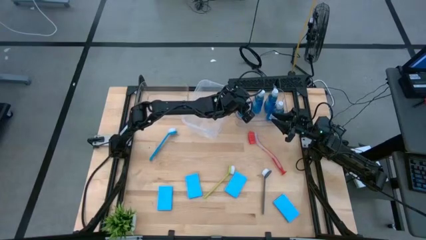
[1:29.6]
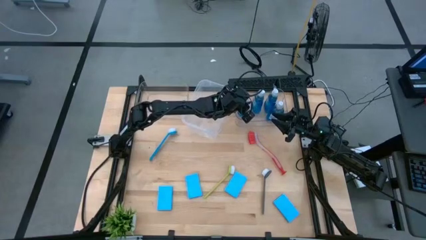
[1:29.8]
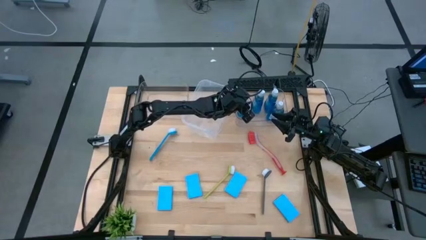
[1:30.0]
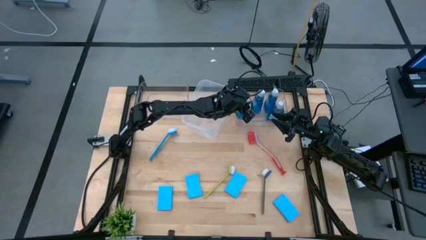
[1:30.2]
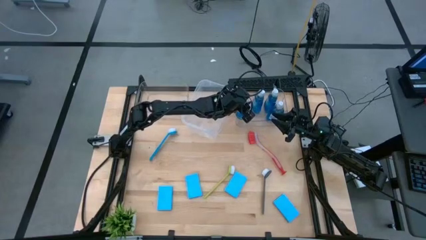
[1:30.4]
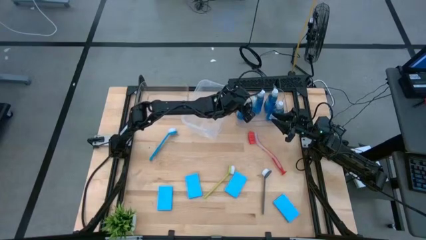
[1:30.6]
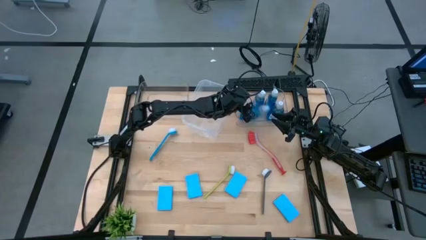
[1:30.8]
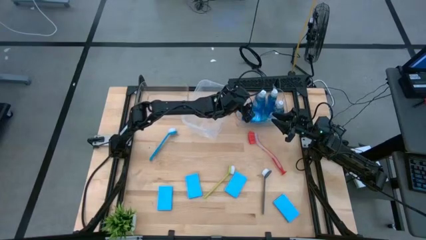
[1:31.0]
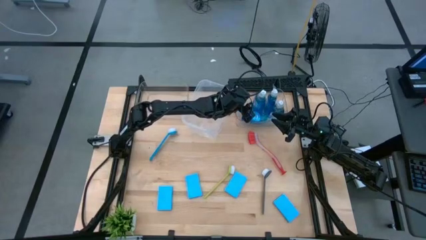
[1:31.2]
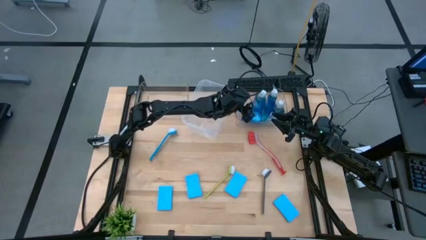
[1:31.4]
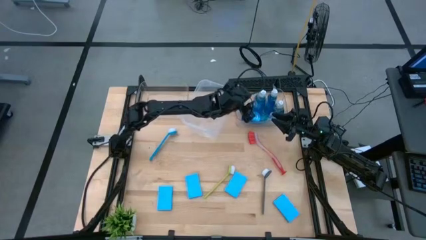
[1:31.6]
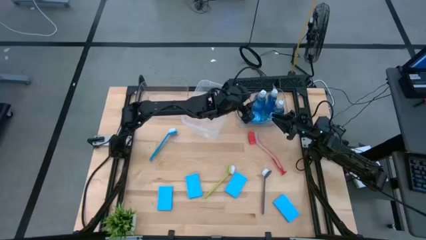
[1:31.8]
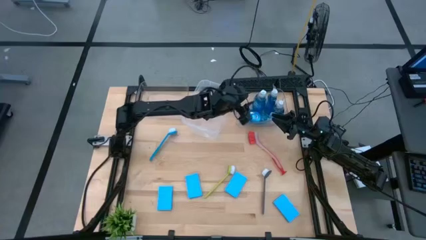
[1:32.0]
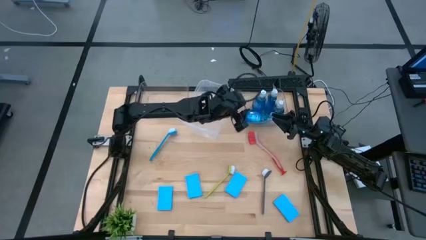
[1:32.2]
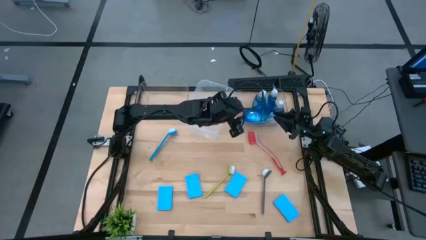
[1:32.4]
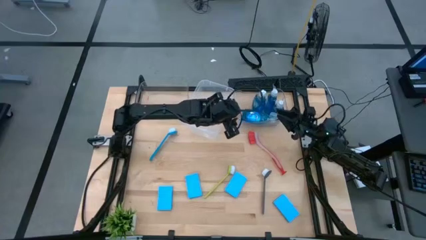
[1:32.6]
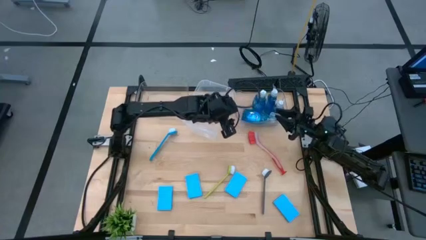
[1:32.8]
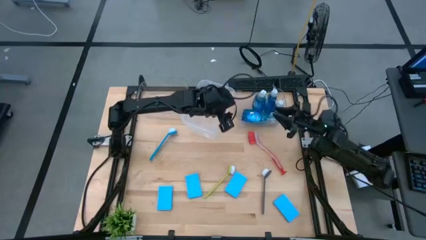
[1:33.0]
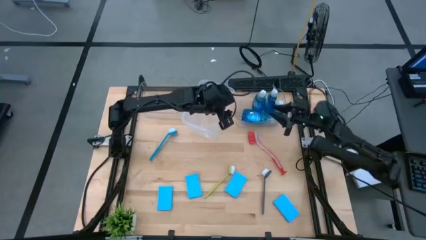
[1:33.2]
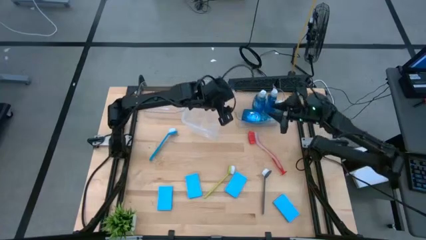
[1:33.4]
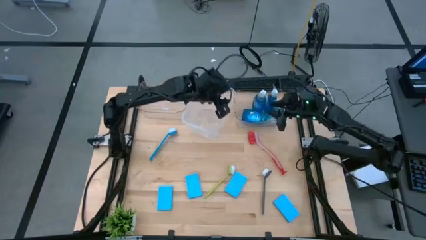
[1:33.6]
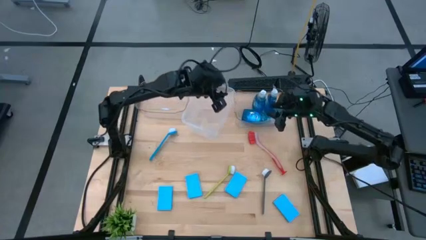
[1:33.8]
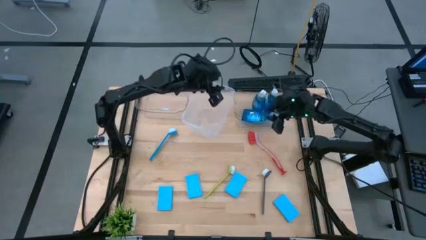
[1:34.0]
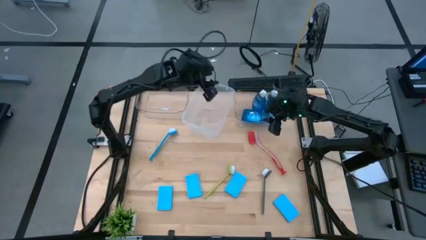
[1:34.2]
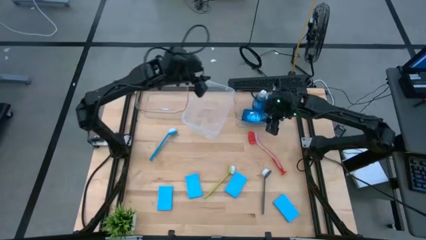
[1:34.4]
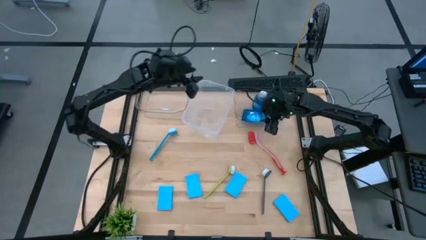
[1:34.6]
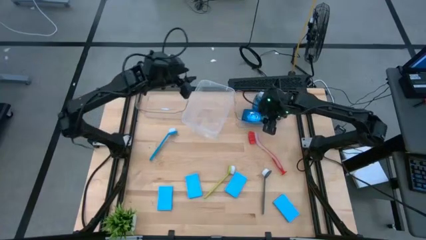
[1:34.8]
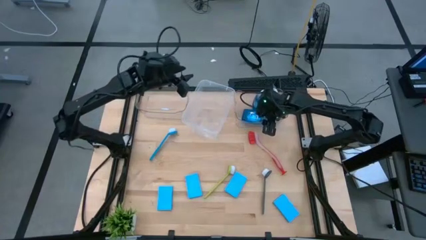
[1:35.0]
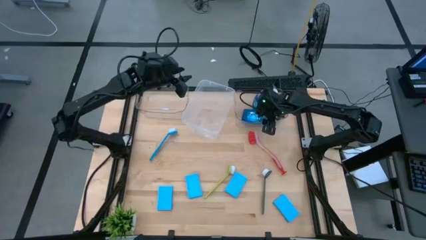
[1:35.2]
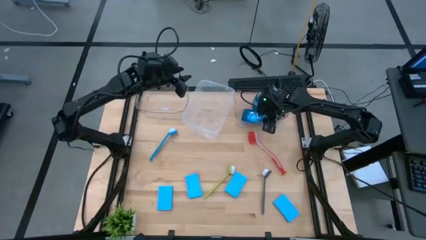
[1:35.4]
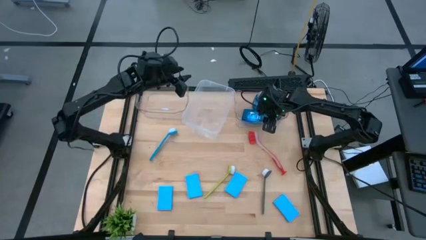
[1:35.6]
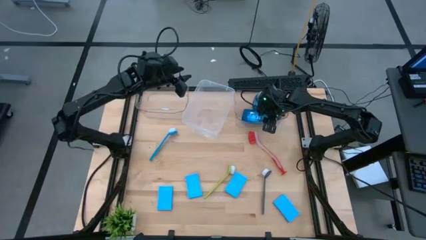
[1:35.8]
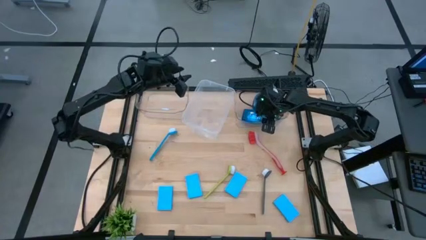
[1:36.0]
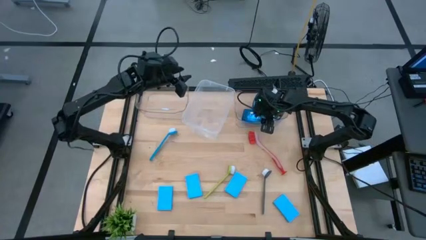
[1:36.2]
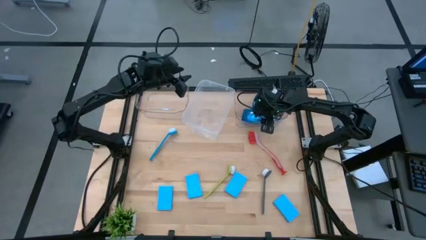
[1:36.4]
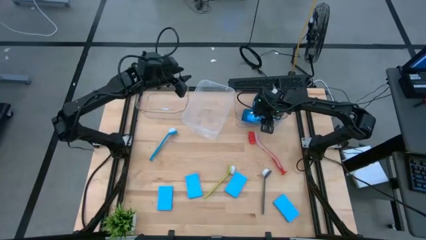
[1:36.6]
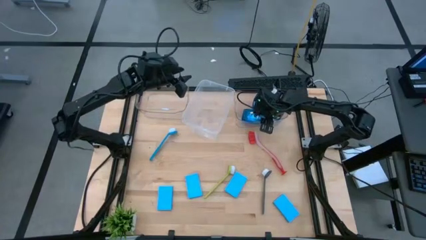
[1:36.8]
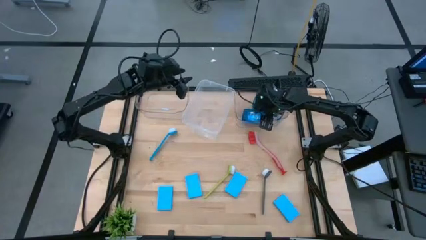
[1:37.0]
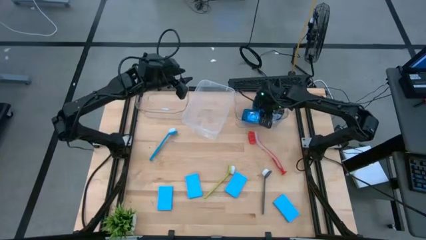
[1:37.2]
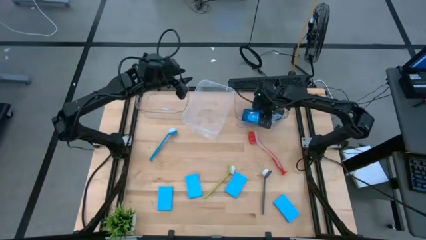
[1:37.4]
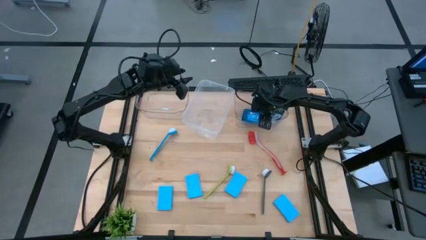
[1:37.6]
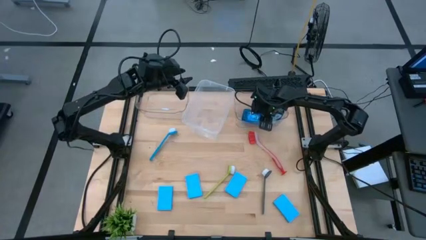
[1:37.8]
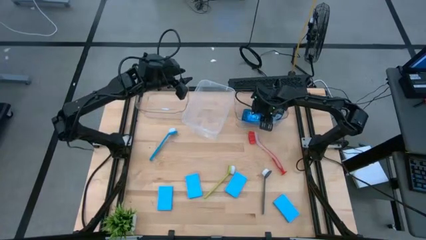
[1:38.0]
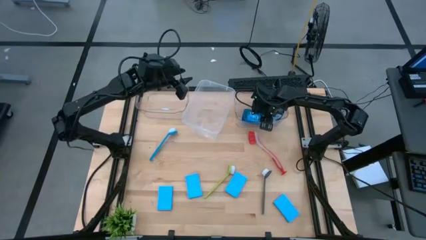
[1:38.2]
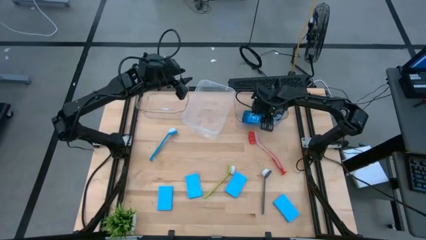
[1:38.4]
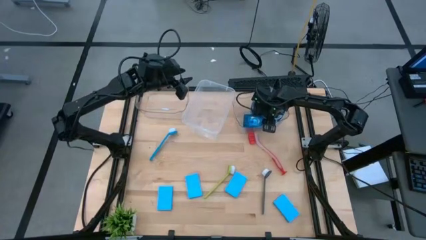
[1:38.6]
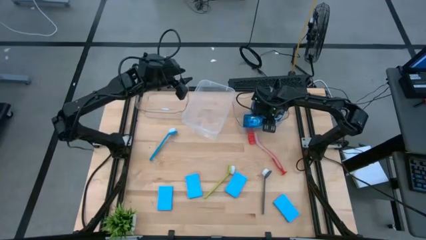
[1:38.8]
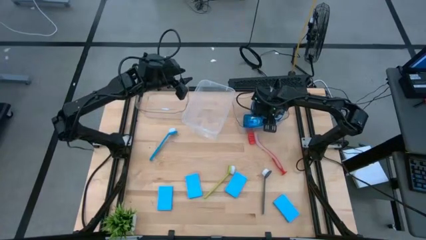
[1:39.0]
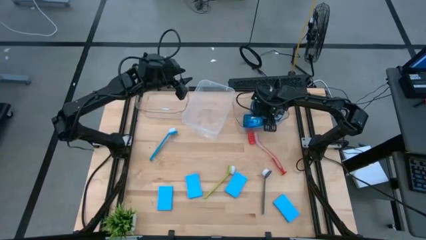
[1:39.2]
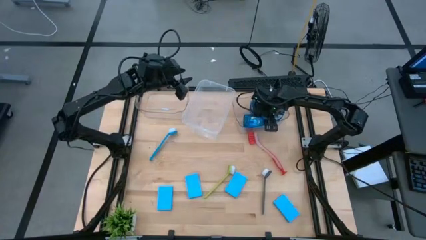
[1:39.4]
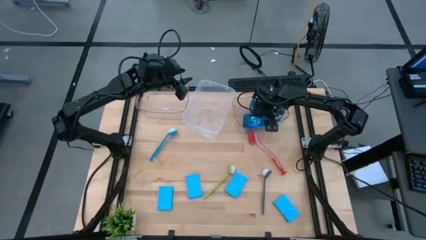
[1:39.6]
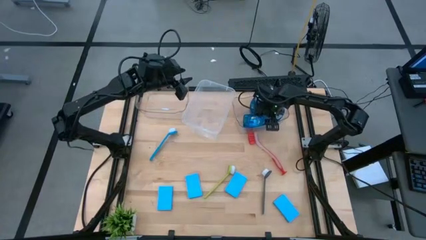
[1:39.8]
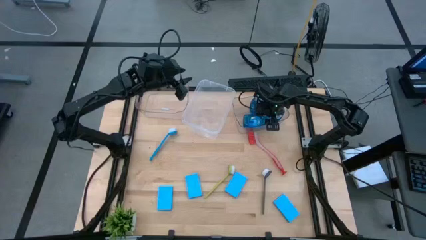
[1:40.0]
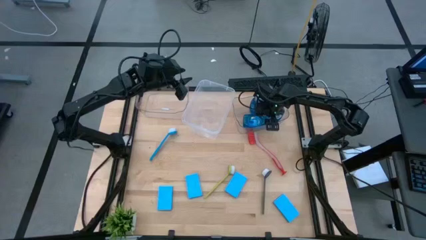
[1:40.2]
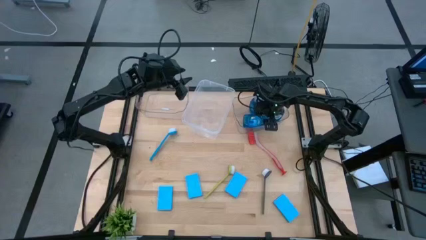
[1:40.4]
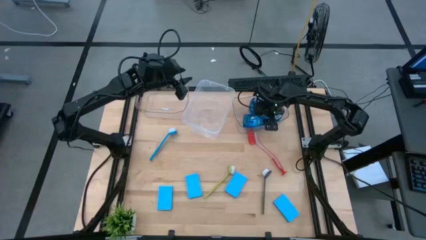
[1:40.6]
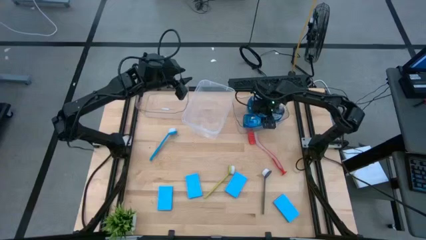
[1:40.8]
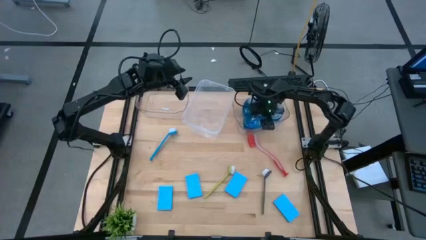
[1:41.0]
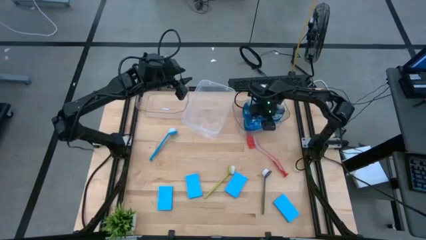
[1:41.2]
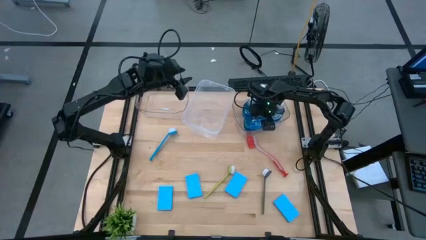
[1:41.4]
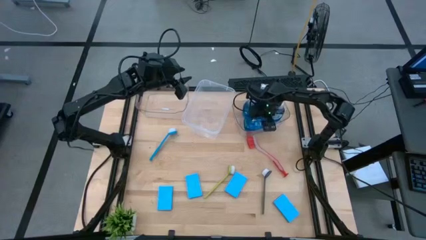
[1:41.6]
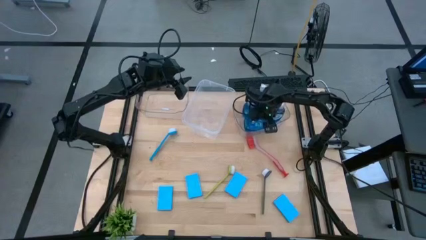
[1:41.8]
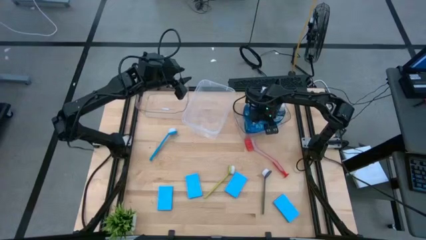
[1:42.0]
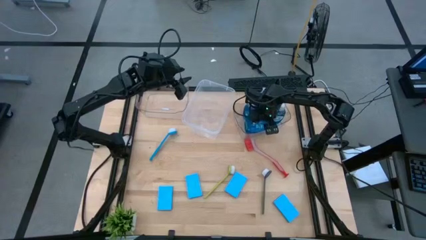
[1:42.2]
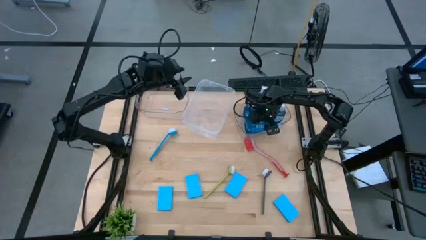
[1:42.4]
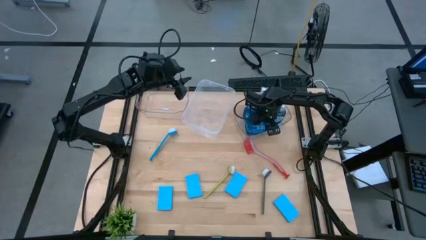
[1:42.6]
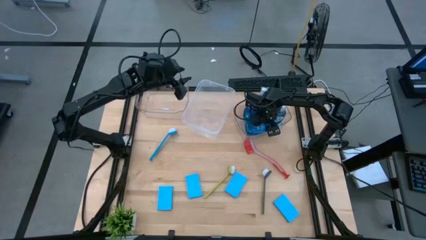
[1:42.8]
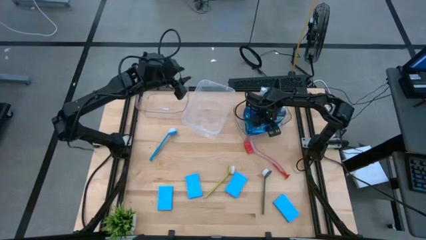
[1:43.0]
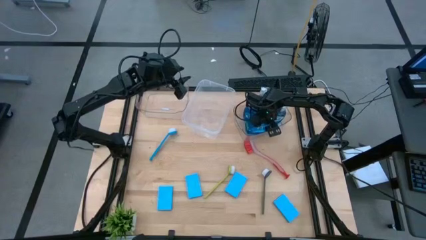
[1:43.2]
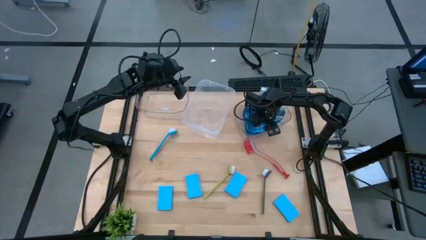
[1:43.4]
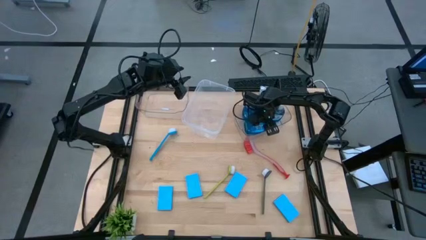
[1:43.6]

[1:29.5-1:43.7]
Task: Pick & Place Kitchen Sink Supplies
Put the blue soap dispenser into the right transparent bin

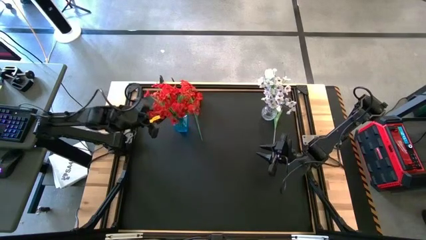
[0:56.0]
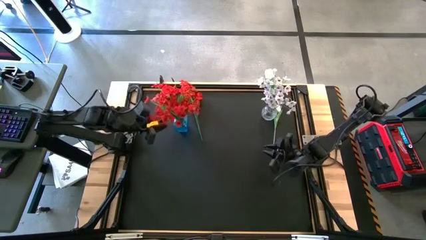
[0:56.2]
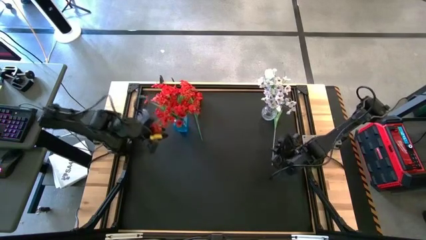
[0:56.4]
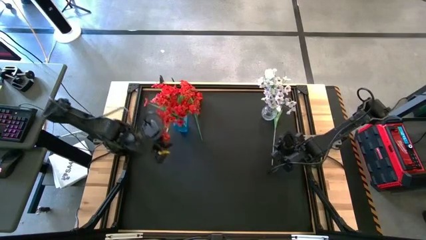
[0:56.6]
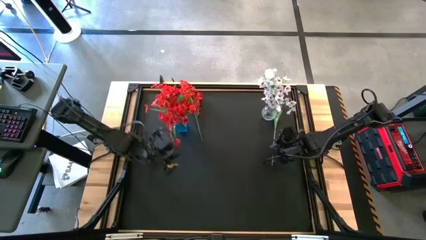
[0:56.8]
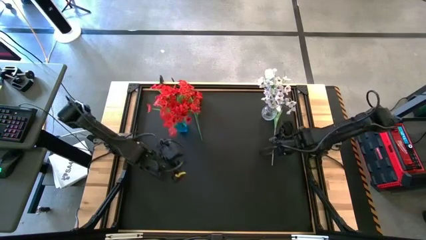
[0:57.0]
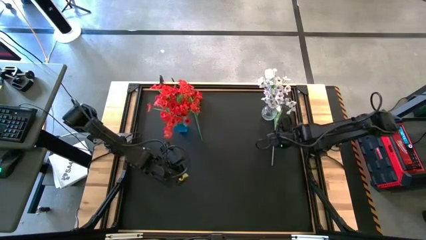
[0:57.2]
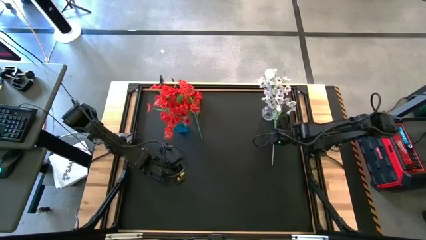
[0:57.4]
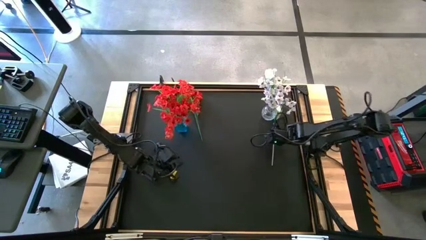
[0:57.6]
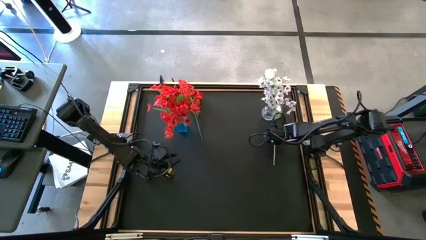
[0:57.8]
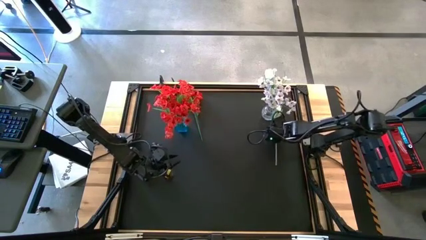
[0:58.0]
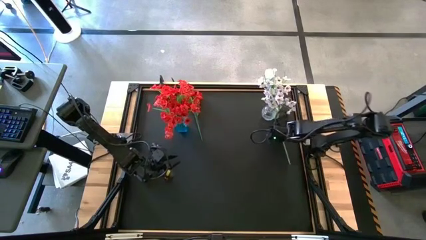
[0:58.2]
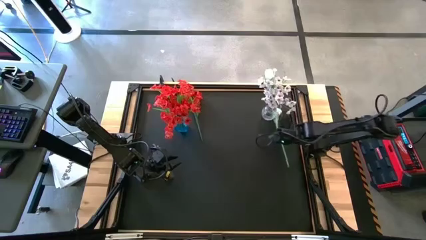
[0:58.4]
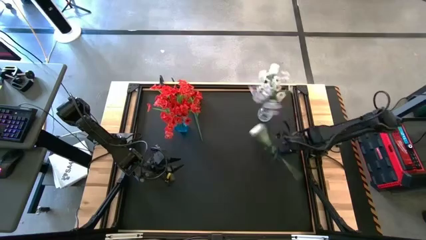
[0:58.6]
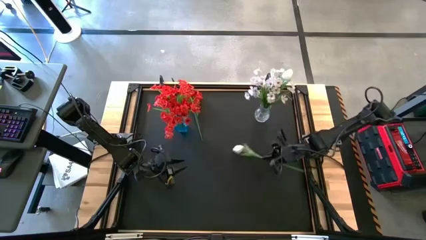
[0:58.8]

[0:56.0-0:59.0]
Task: Sort flowers into vase by color
Put the white flower into the transparent vase
